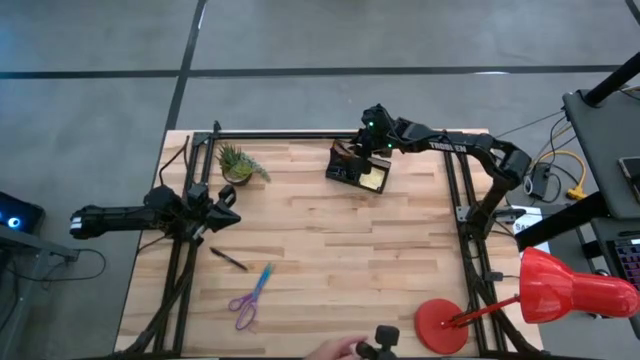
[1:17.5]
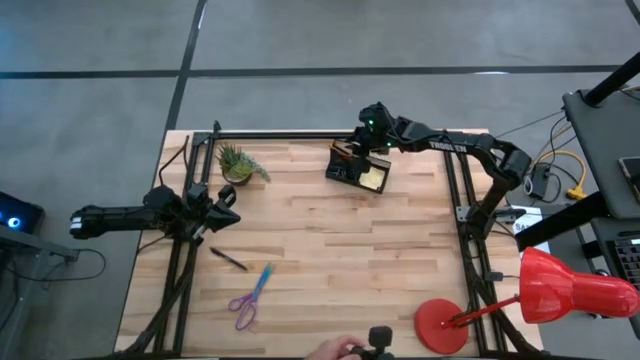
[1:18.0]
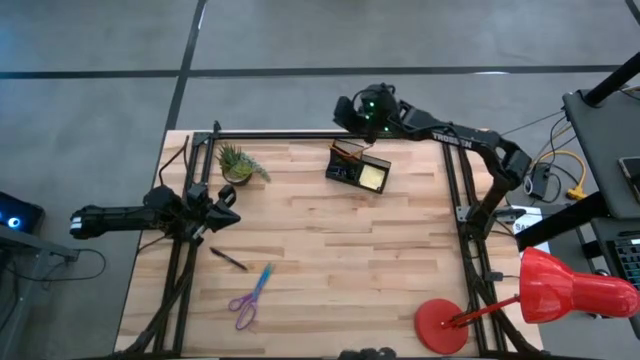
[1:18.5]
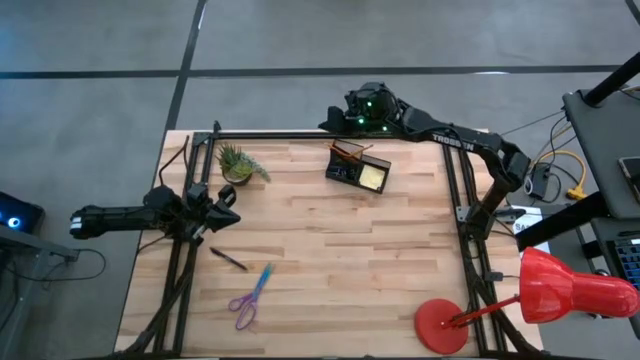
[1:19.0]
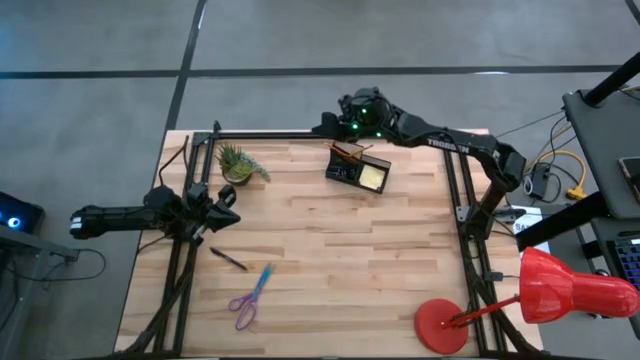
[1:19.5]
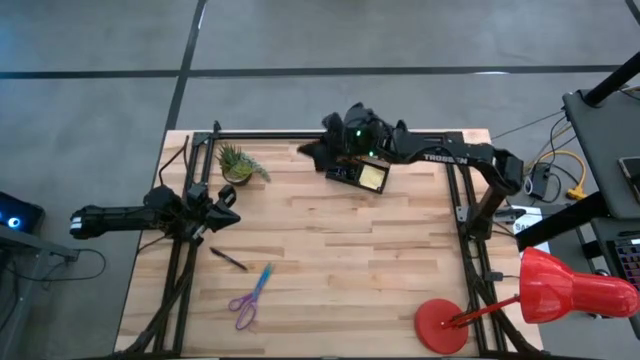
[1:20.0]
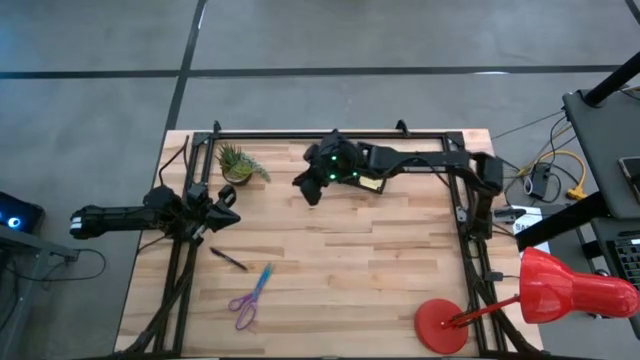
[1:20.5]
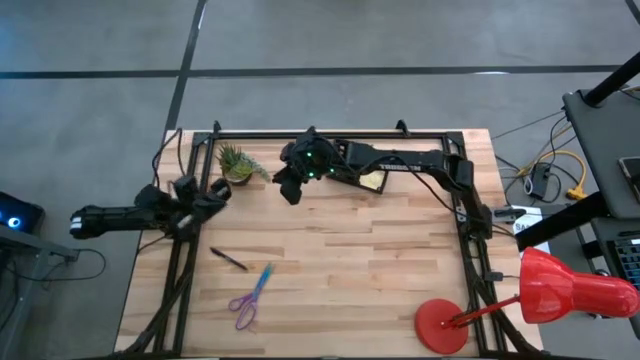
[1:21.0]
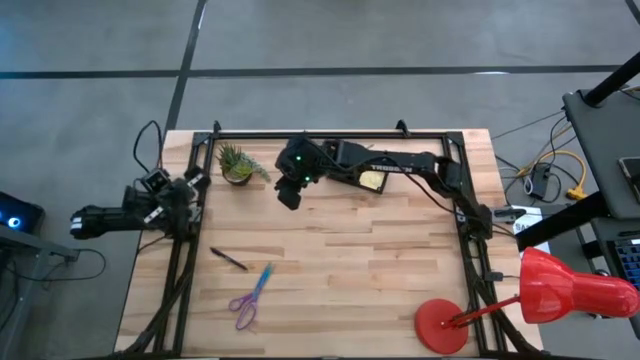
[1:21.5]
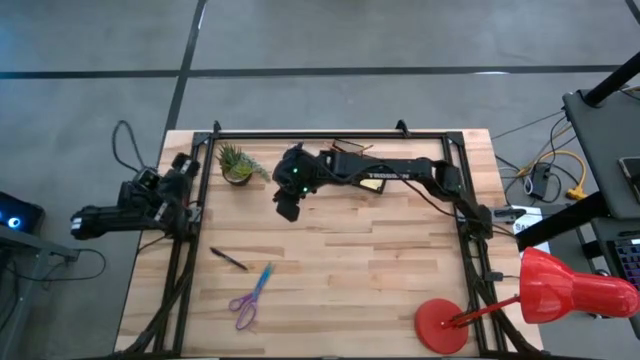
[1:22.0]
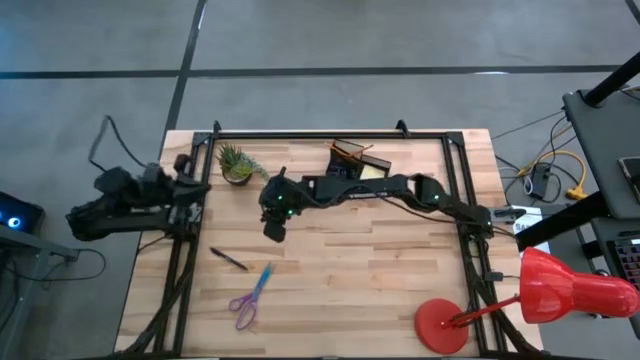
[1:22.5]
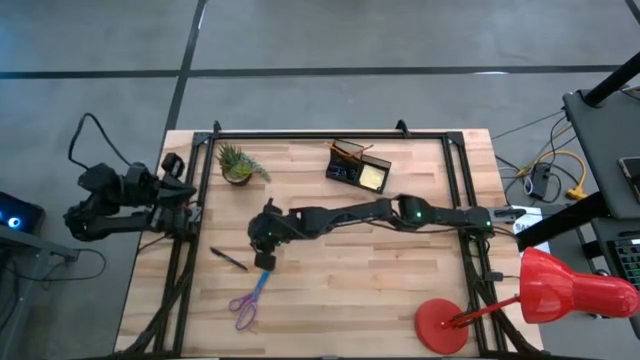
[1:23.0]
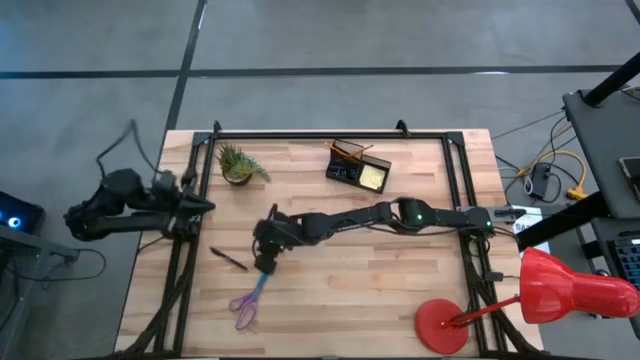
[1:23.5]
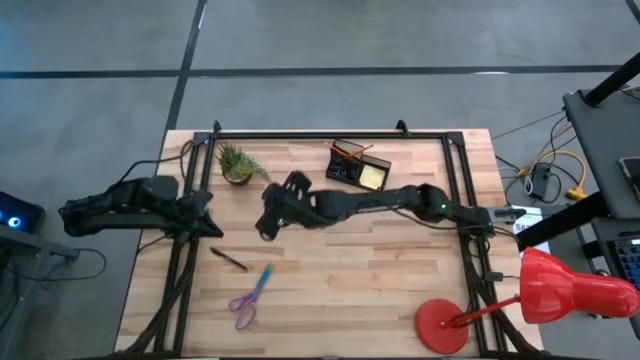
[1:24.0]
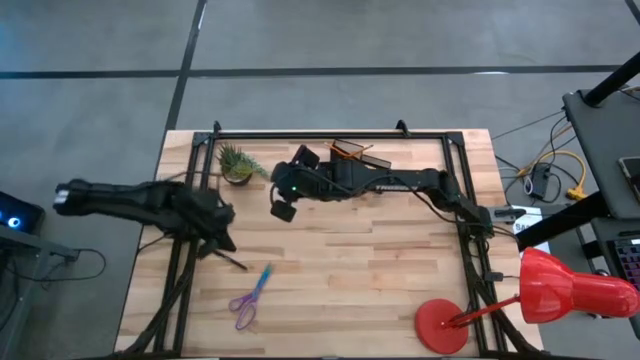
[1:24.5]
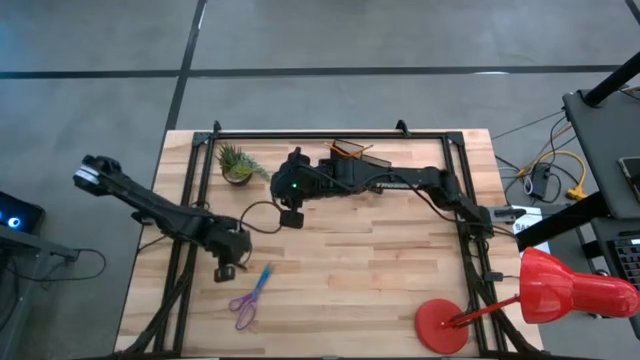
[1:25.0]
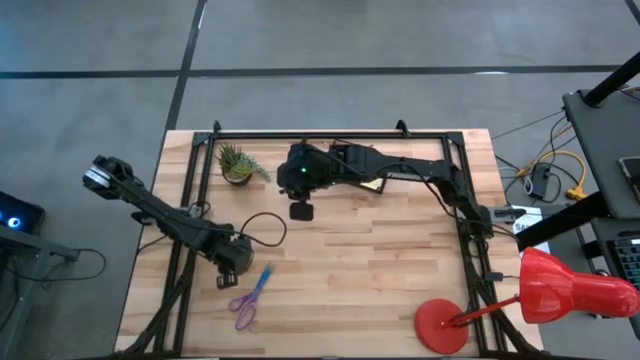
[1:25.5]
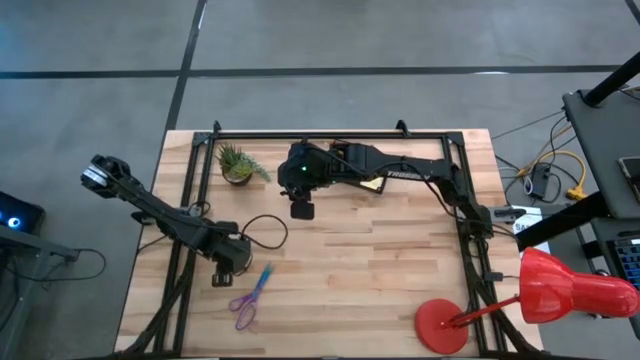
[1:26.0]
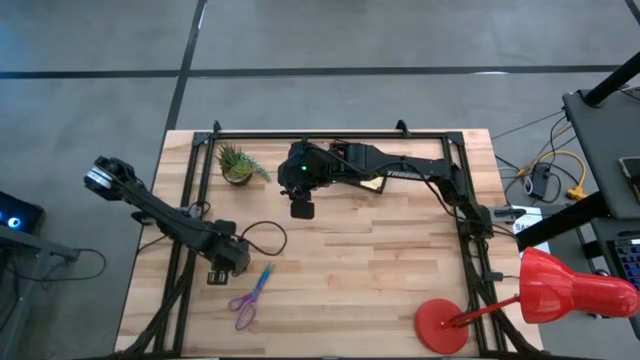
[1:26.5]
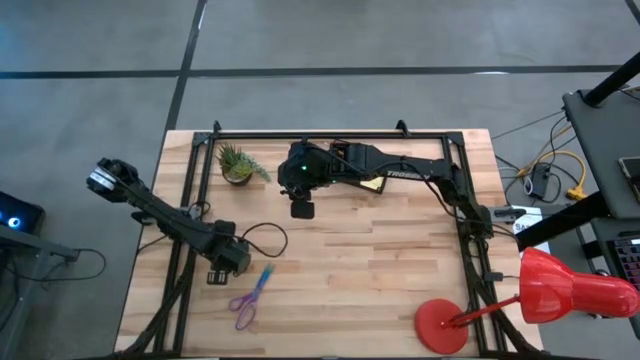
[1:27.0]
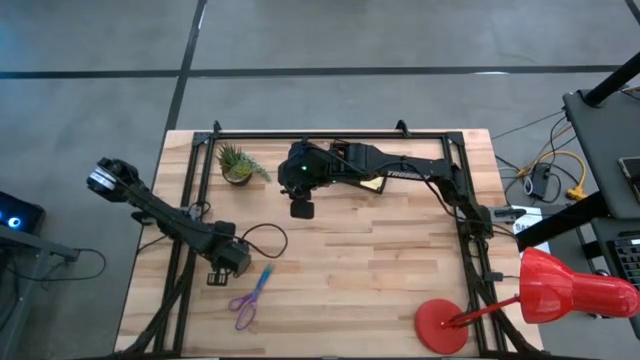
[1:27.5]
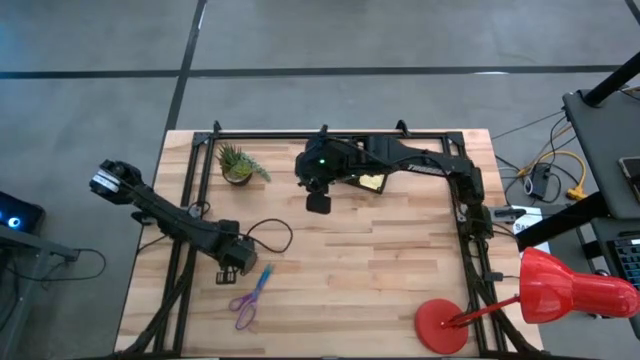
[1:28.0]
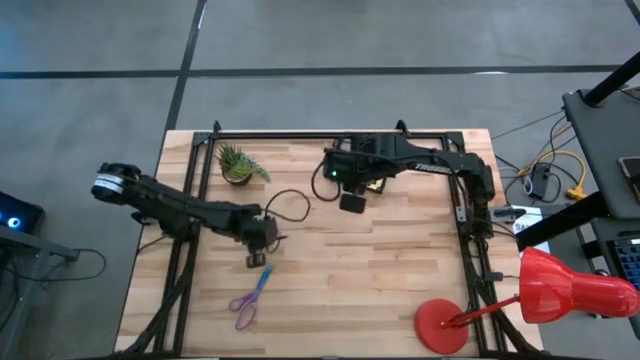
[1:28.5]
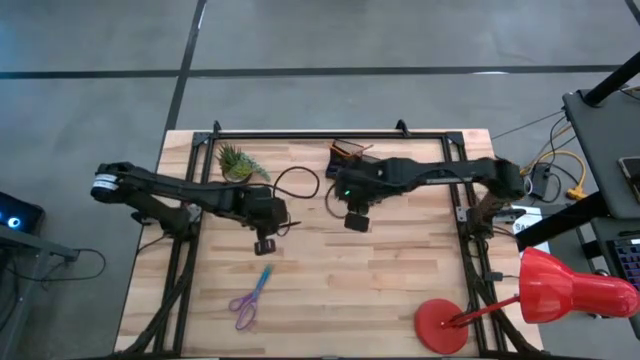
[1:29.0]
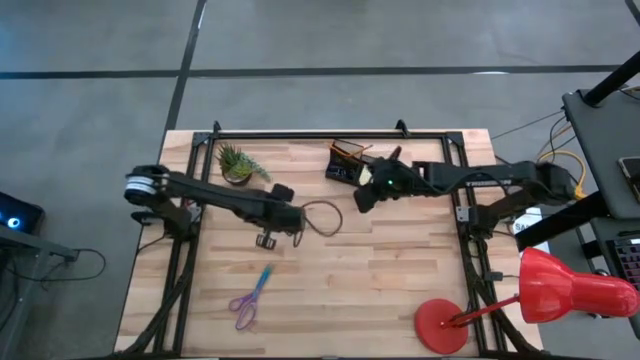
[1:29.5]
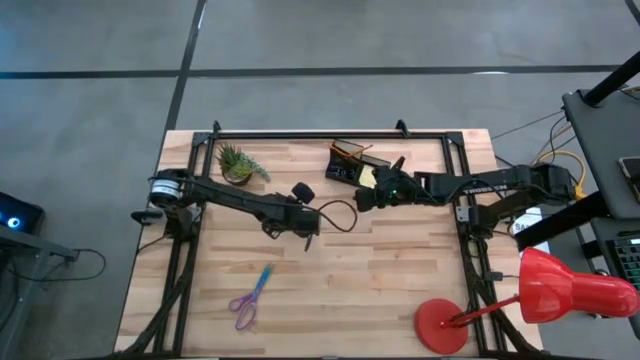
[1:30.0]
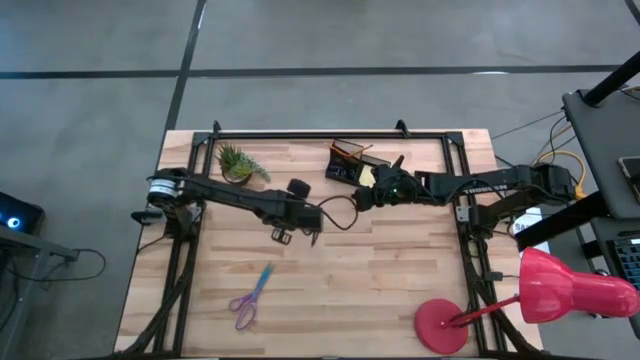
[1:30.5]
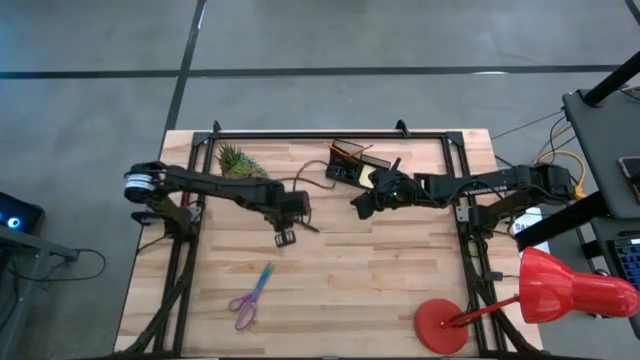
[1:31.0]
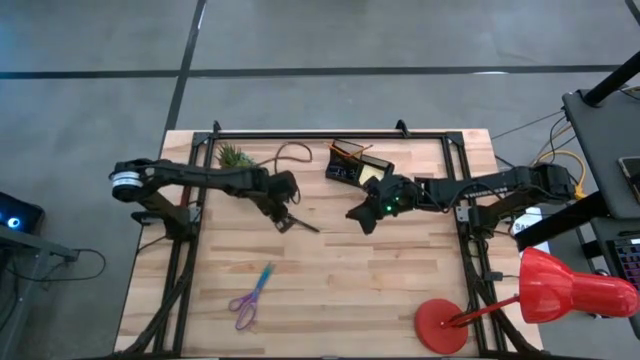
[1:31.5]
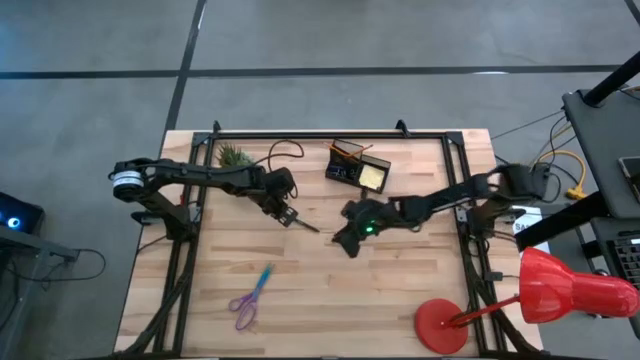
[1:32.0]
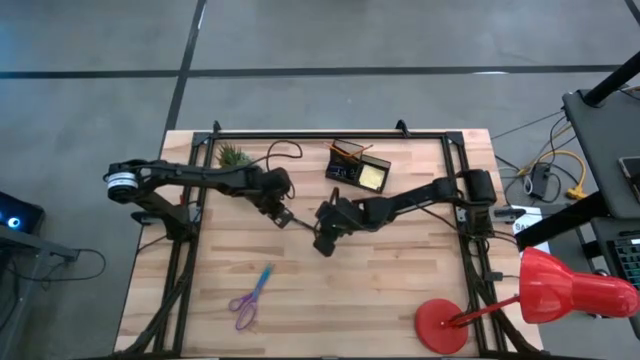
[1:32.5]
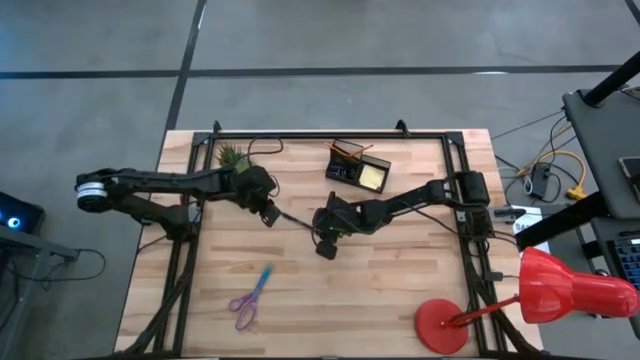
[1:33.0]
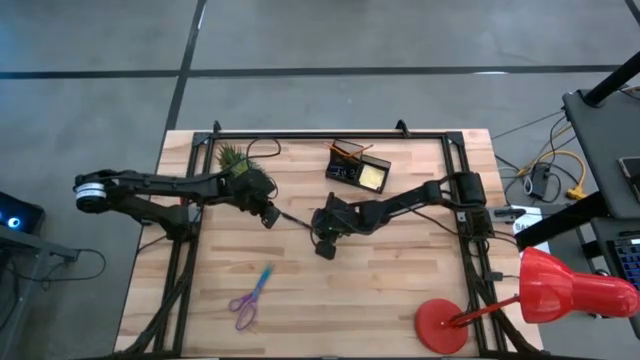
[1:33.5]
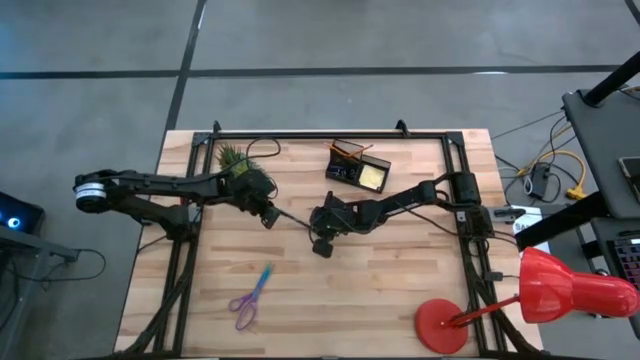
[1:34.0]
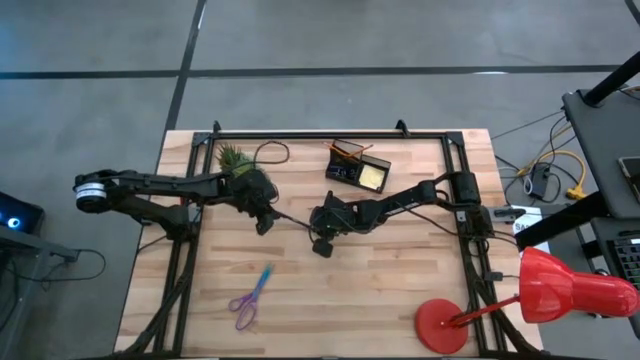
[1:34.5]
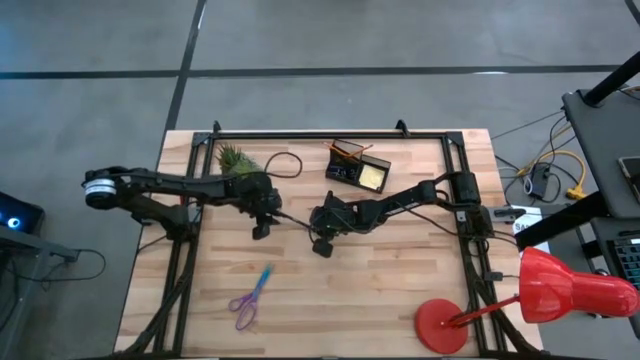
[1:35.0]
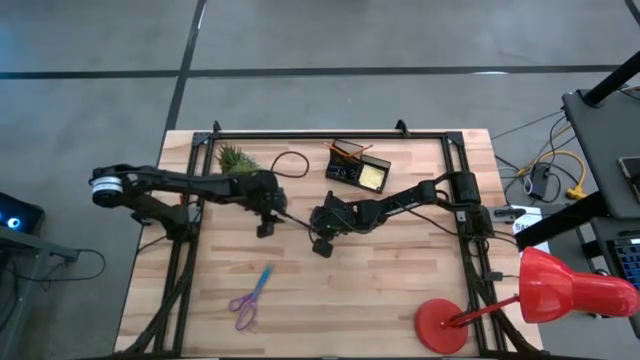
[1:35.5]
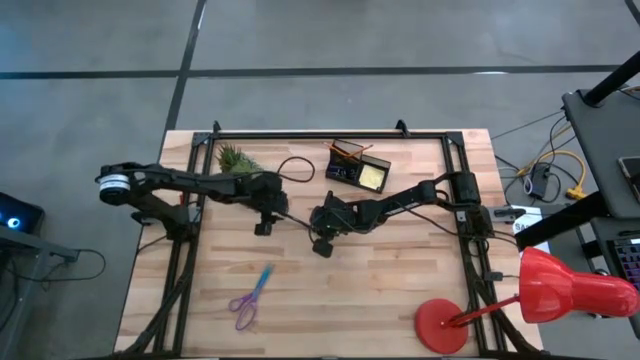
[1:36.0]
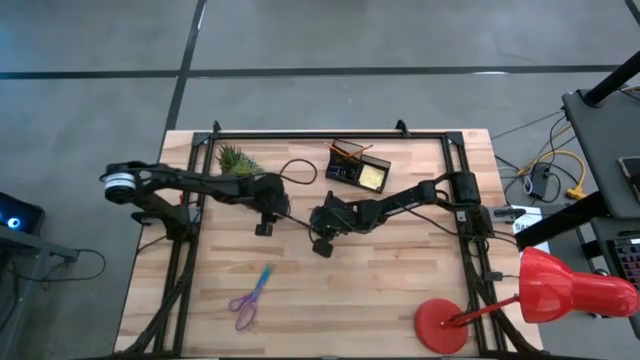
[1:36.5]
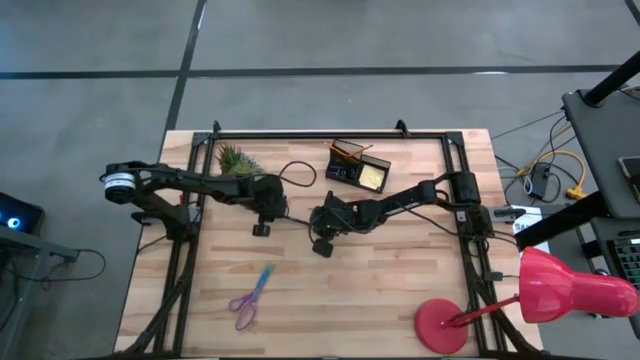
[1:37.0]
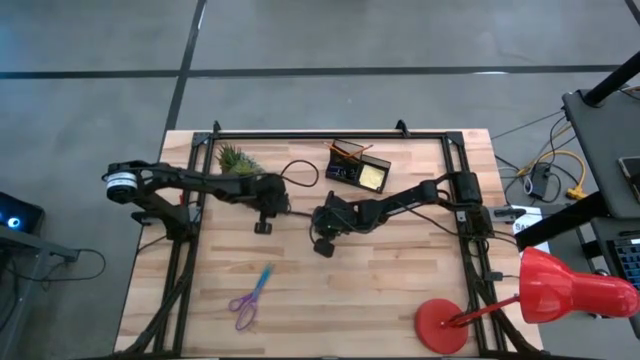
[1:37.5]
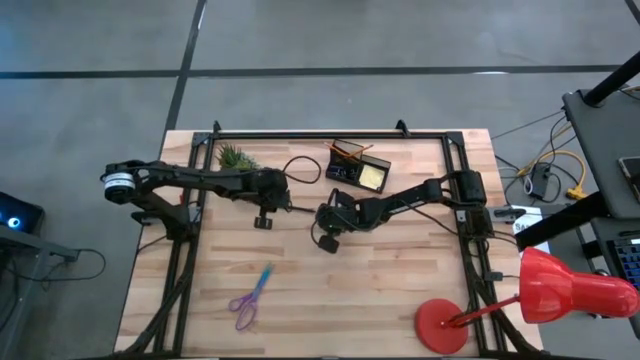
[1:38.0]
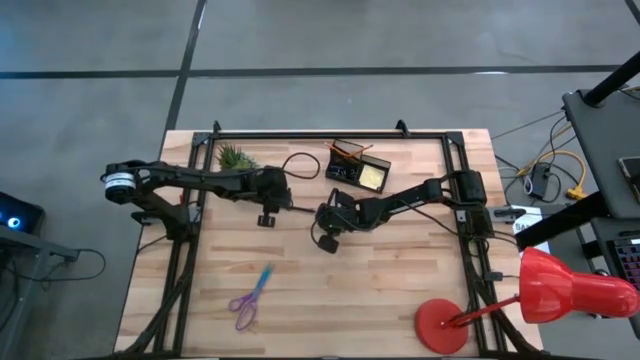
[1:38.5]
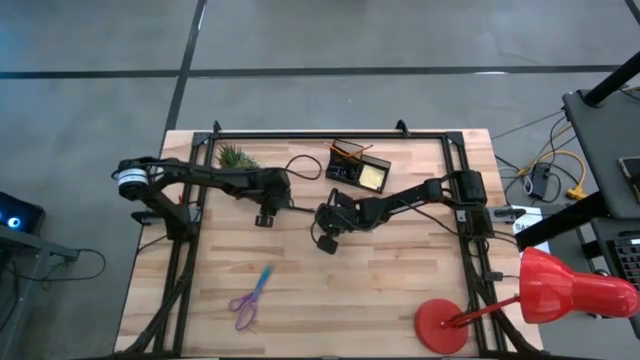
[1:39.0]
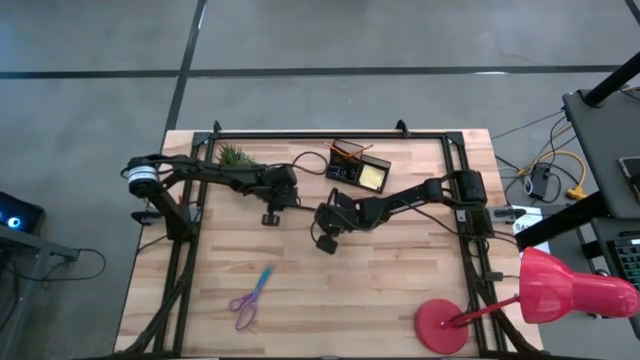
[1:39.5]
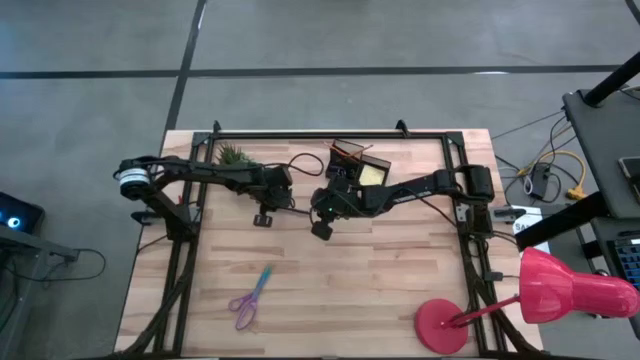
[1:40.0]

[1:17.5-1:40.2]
Task: Pick and place office supplies into organizer
Put the black pen into the black desk organizer
